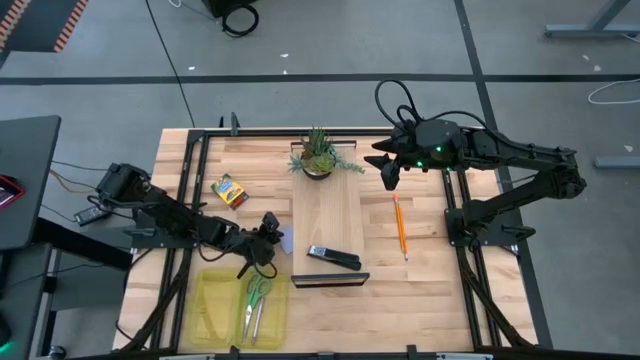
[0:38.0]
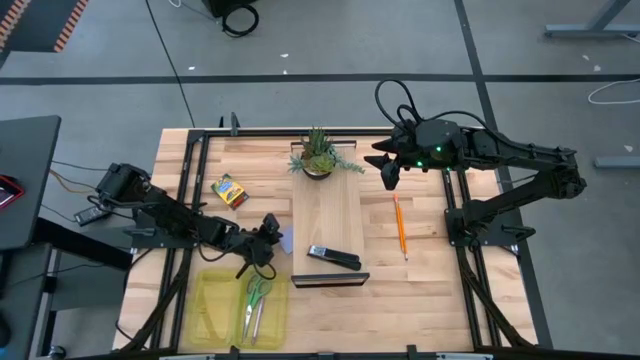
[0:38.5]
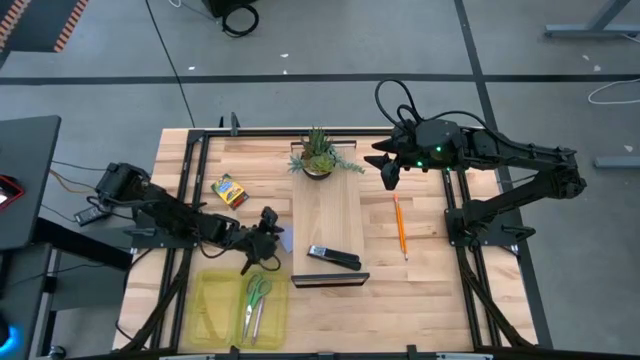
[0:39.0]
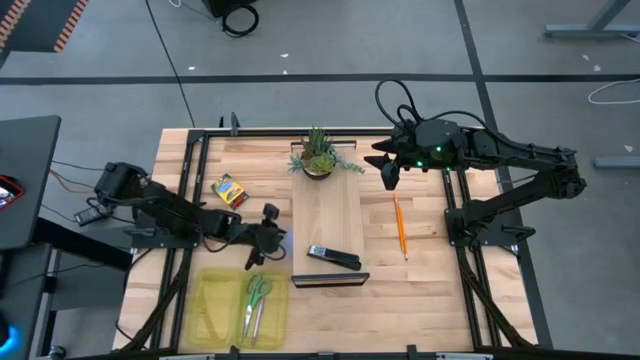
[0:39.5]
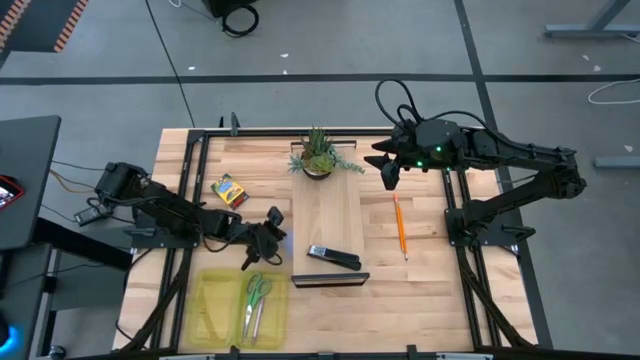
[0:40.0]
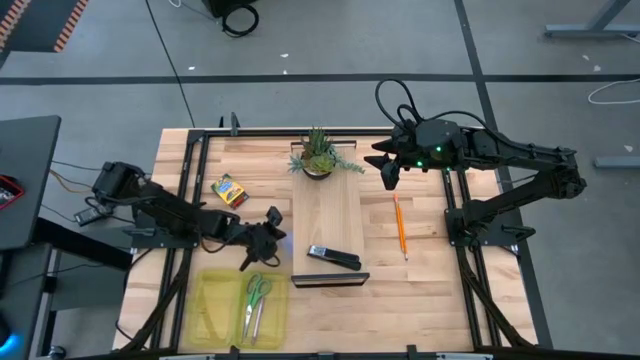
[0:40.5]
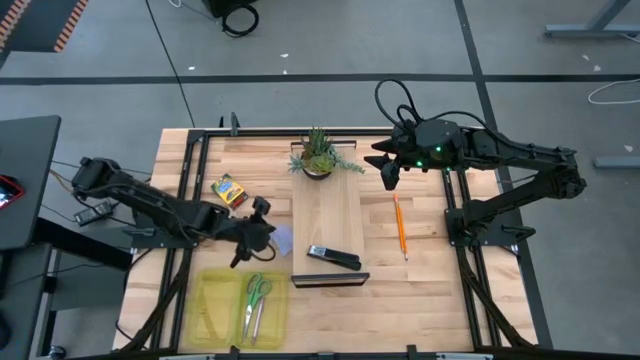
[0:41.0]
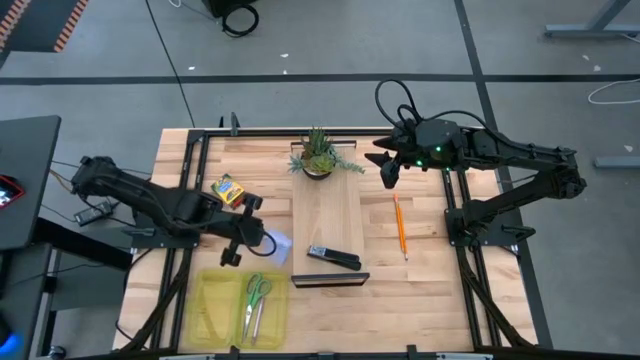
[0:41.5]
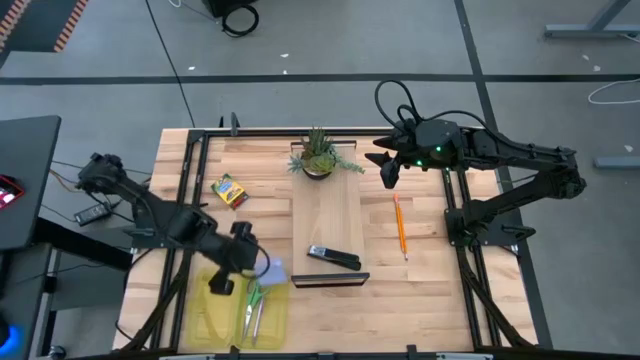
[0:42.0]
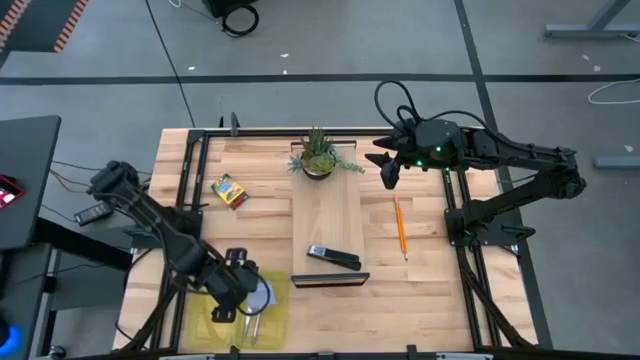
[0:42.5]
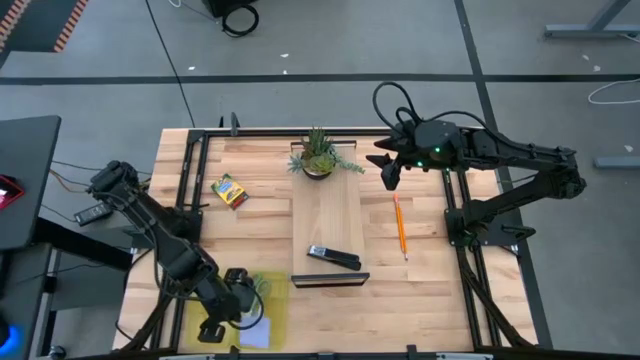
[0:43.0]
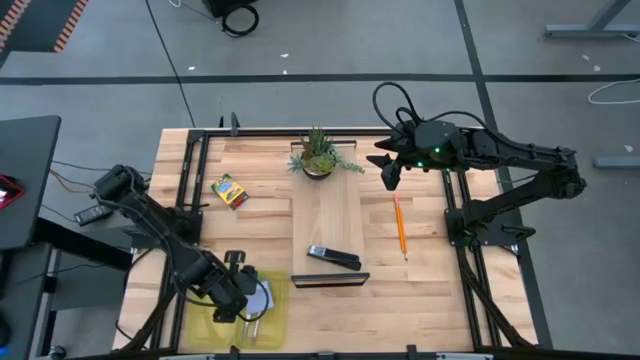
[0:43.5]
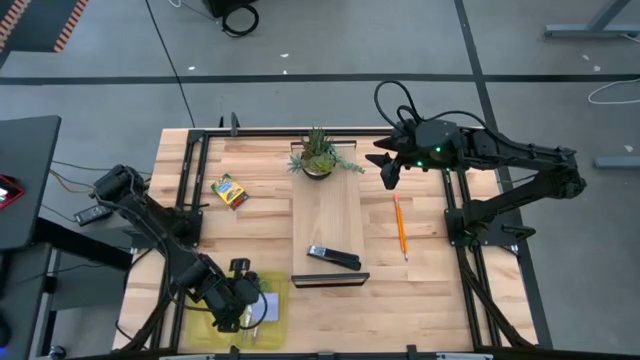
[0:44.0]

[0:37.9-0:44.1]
Task: Pack school essentials
Put the sticky notes into the supply box

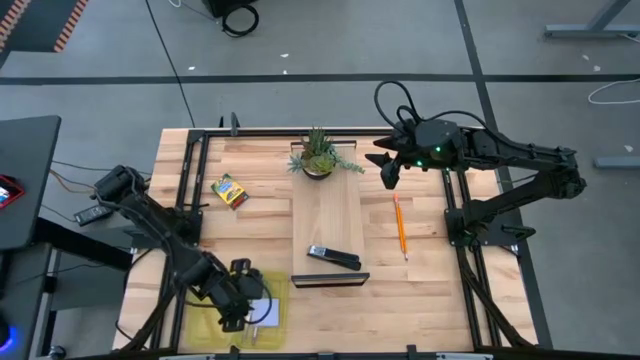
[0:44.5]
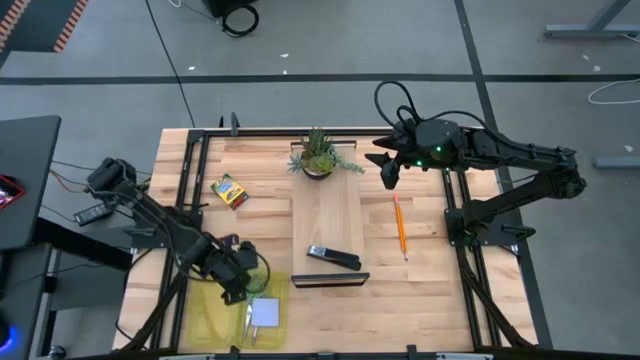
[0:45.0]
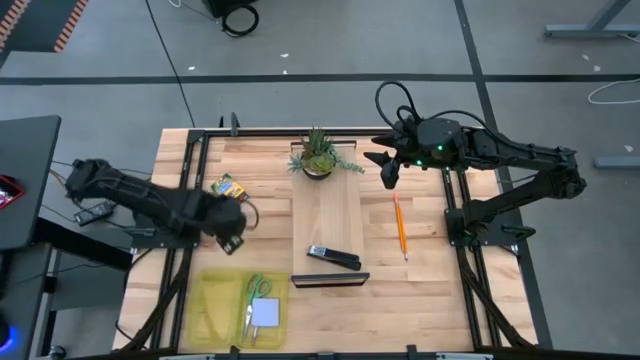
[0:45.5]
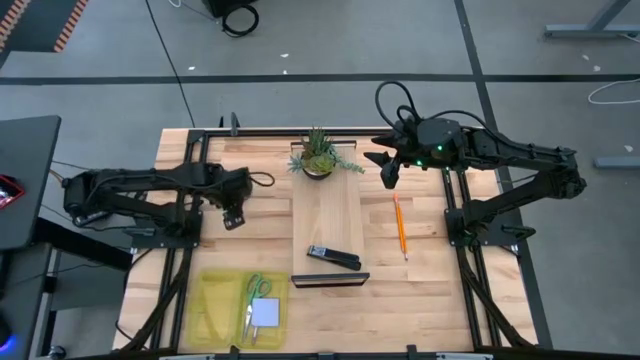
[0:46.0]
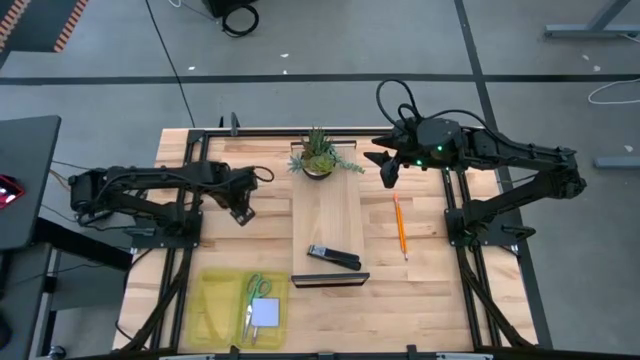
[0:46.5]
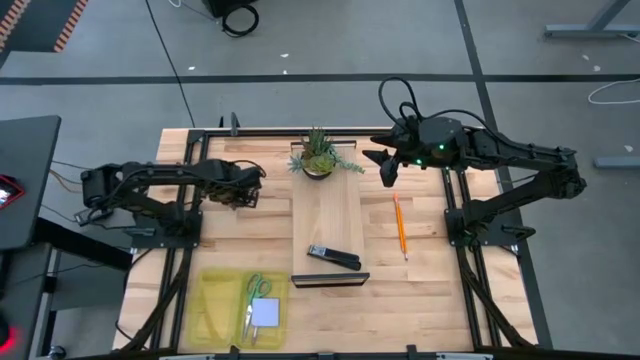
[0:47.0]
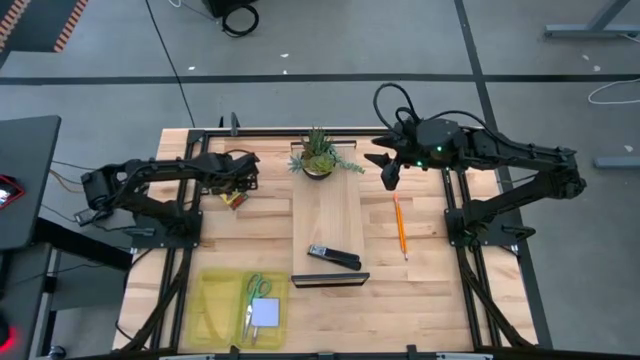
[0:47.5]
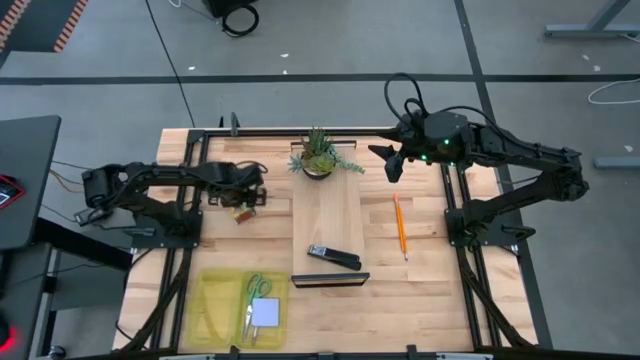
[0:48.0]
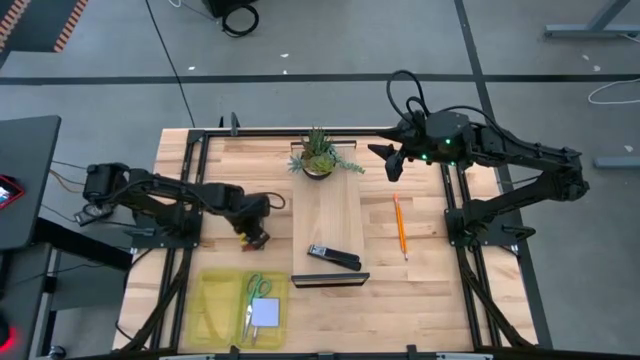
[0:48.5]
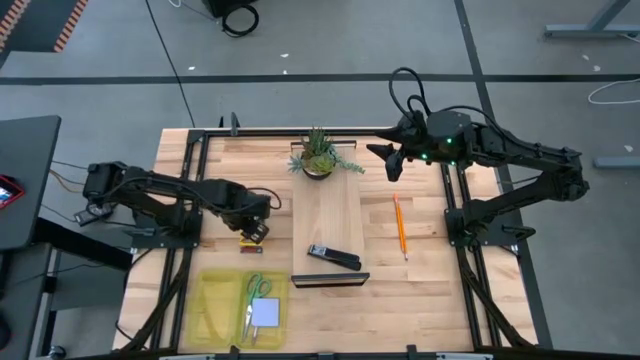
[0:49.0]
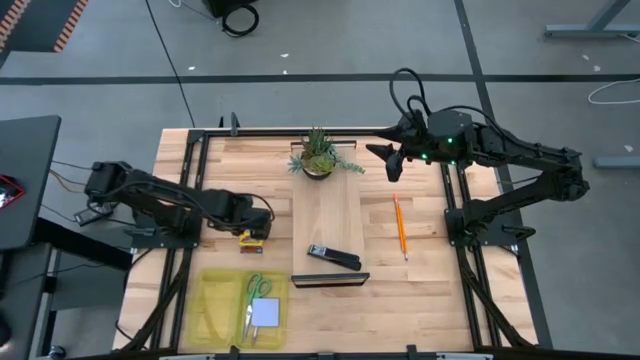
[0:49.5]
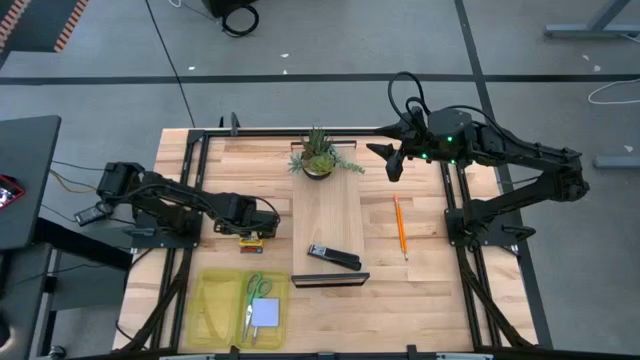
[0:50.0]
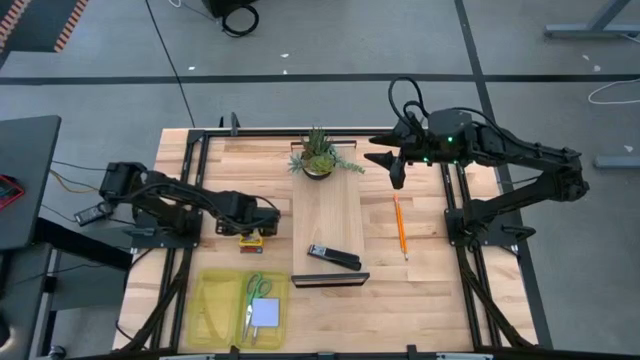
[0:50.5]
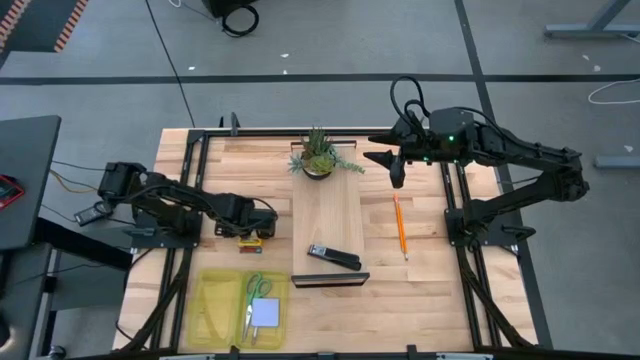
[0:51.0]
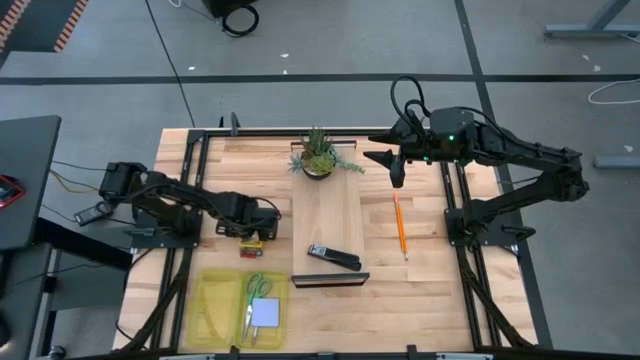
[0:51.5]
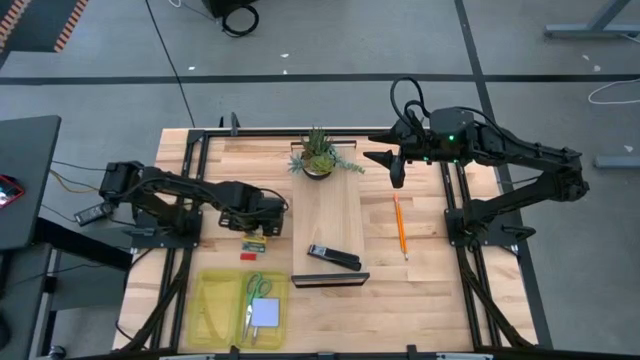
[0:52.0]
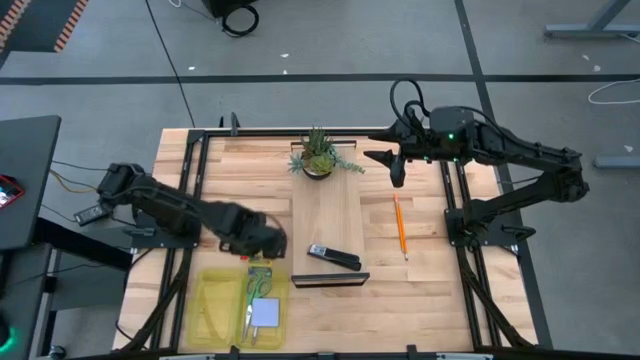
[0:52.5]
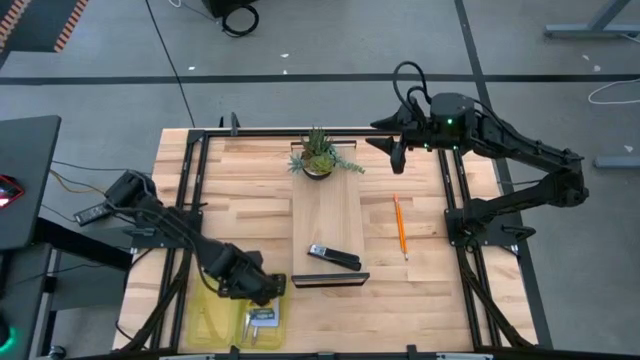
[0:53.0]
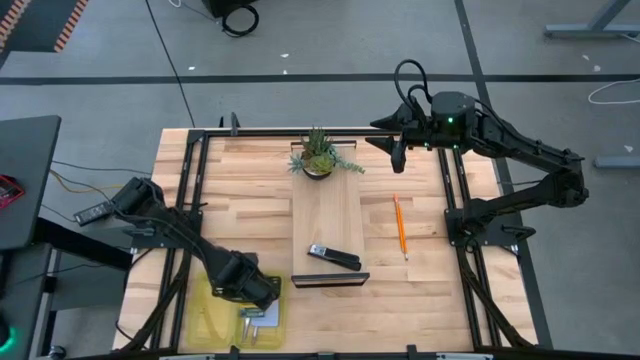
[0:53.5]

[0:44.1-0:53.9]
Put the crayon box into the supply box

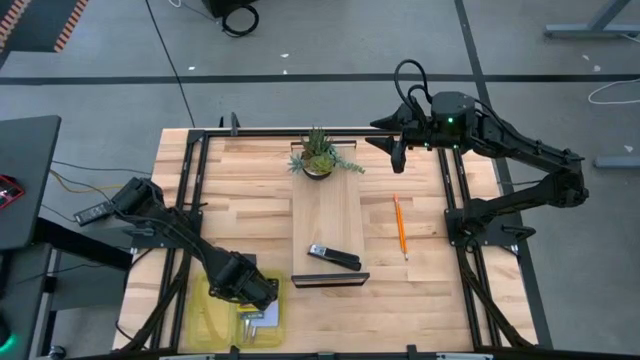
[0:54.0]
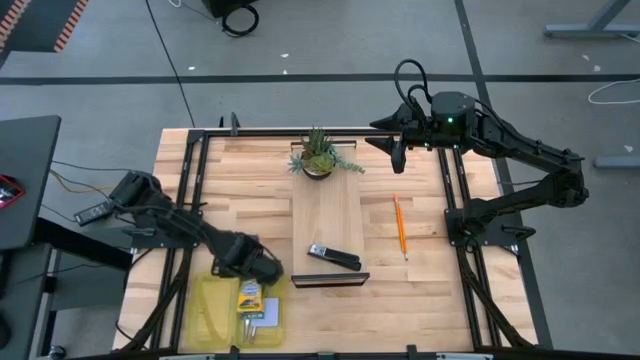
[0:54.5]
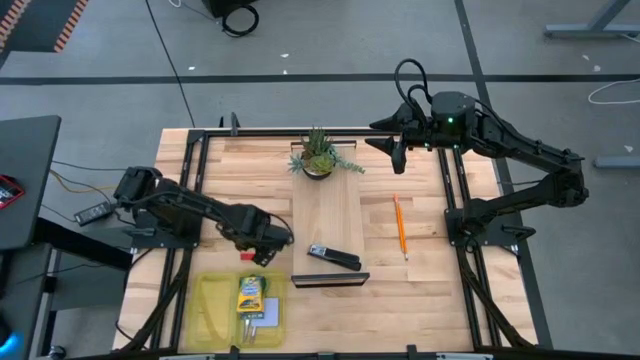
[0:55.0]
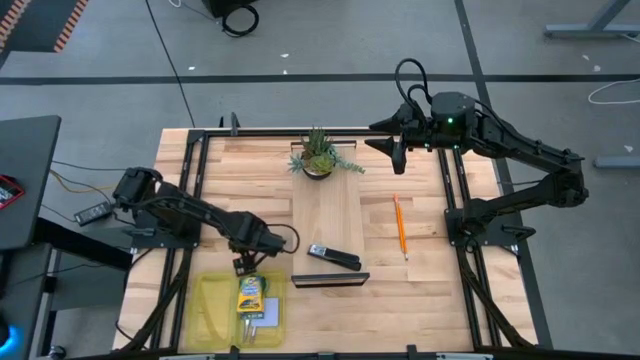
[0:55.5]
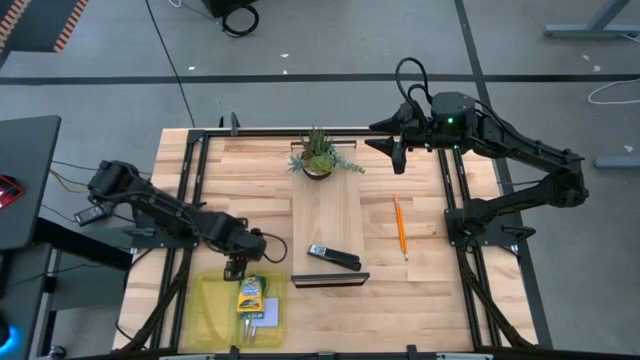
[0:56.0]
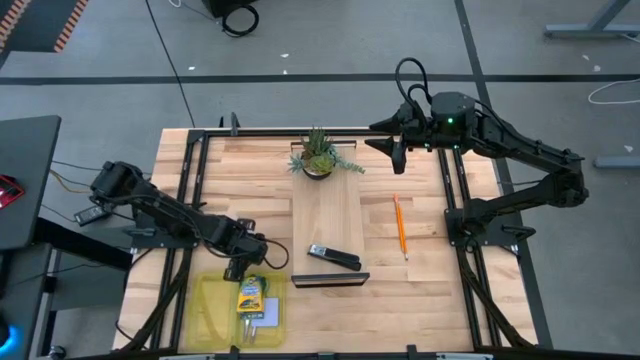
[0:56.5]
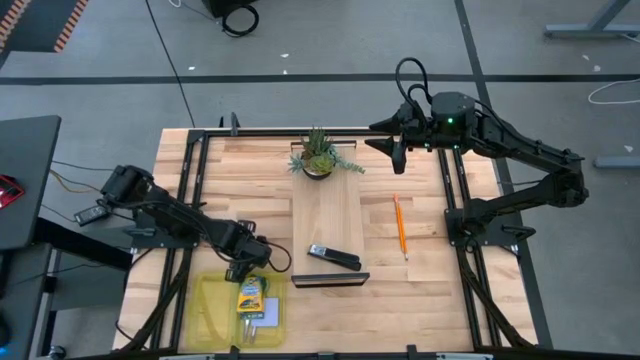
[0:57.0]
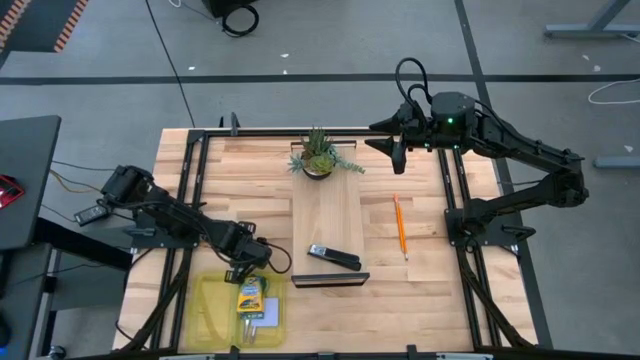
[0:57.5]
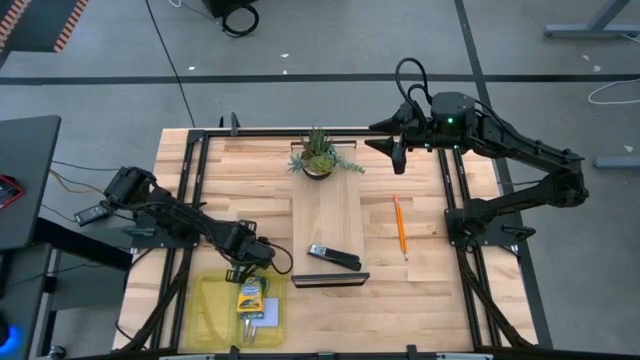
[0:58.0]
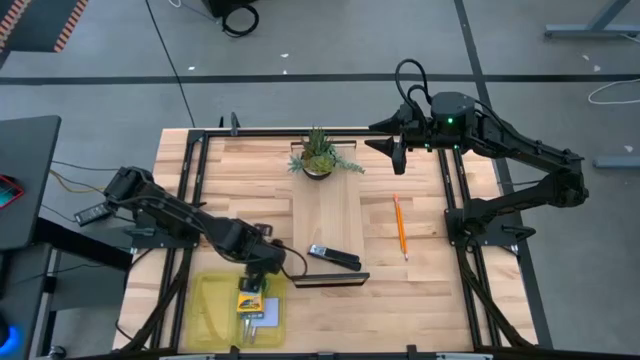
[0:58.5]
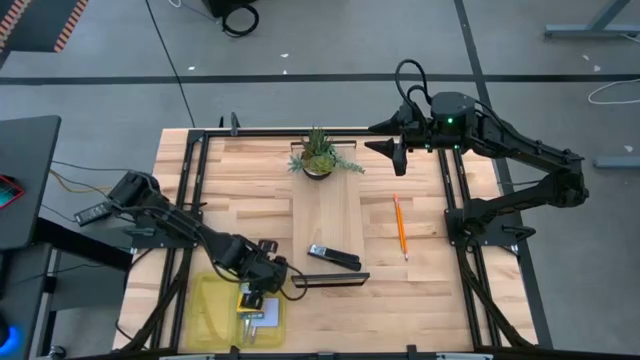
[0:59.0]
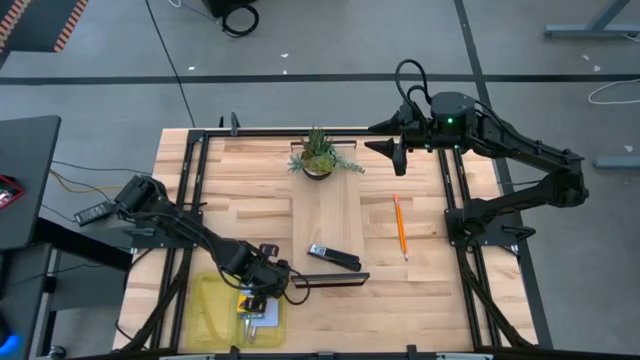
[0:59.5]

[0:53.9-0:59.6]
Put the eraser into the supply box
